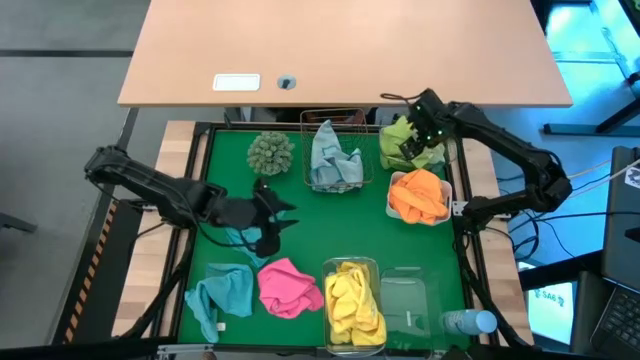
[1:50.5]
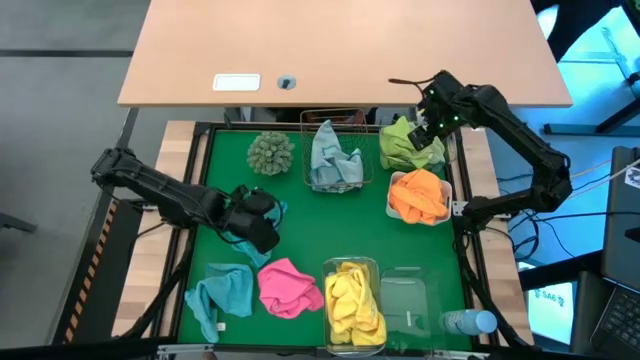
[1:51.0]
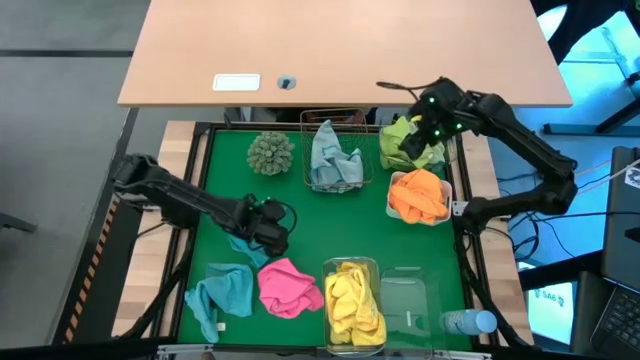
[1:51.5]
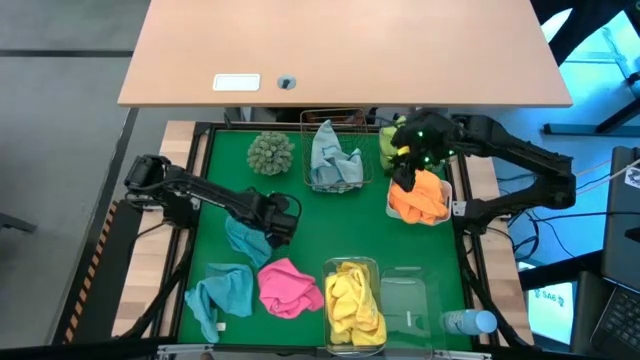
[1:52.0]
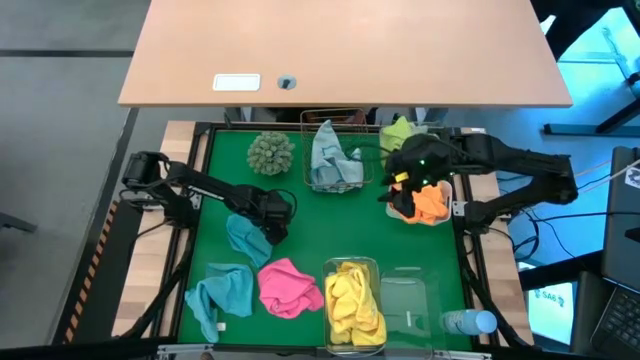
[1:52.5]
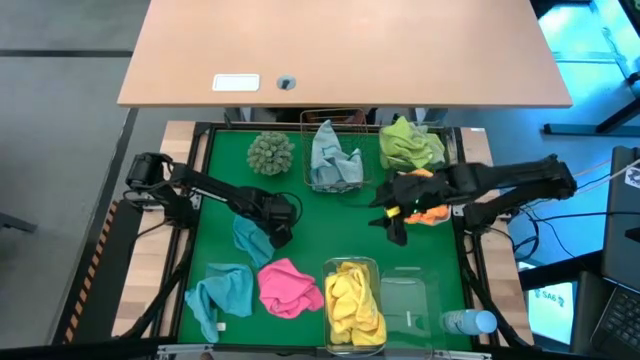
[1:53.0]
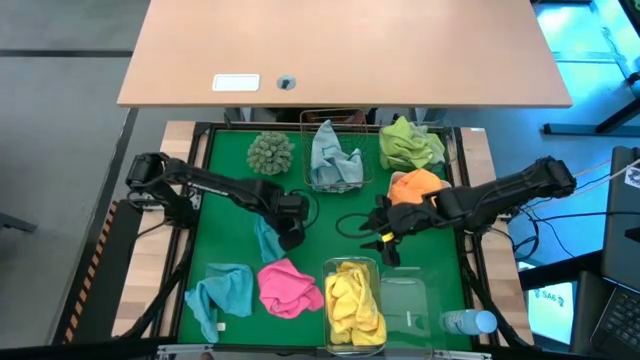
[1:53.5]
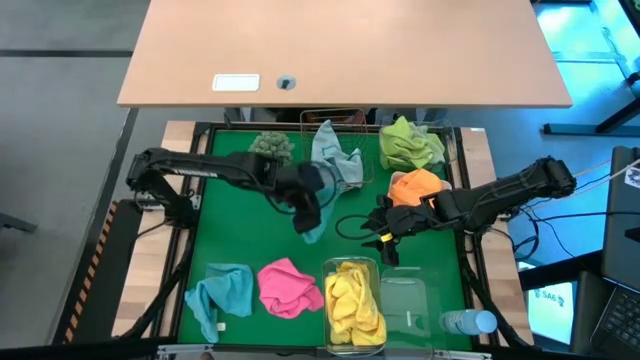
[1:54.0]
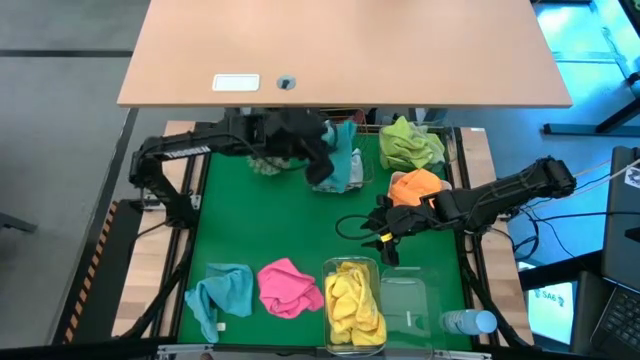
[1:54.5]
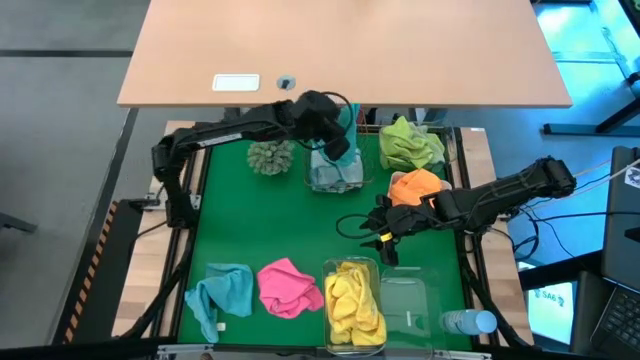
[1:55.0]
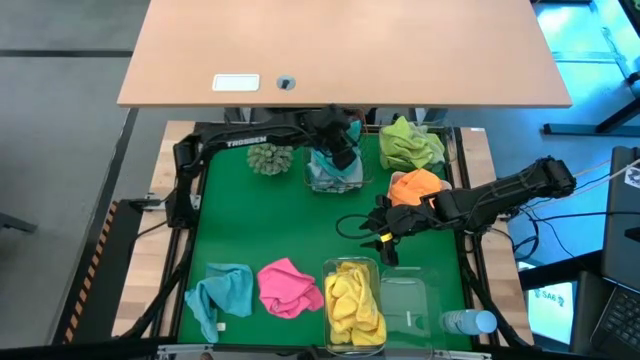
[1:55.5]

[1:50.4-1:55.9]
Task: Sort microfiber towel by color & place in baskets
Put the blue microfiber towel into the wire basket

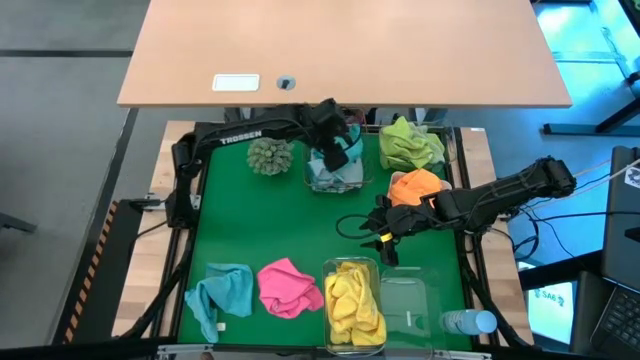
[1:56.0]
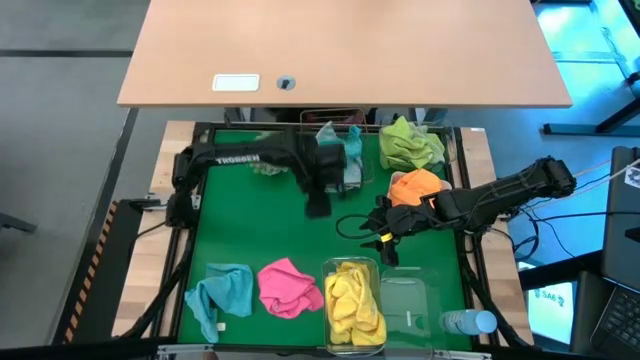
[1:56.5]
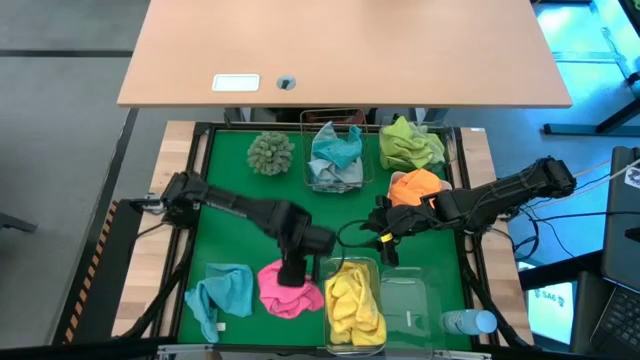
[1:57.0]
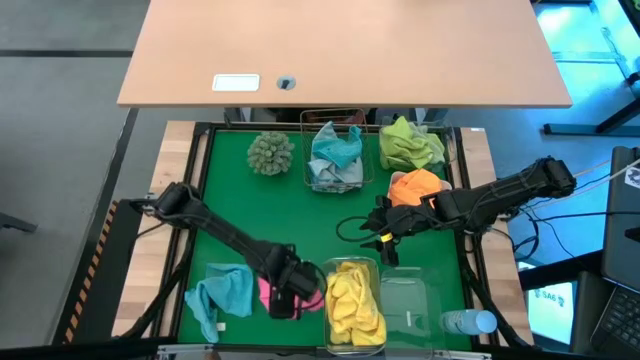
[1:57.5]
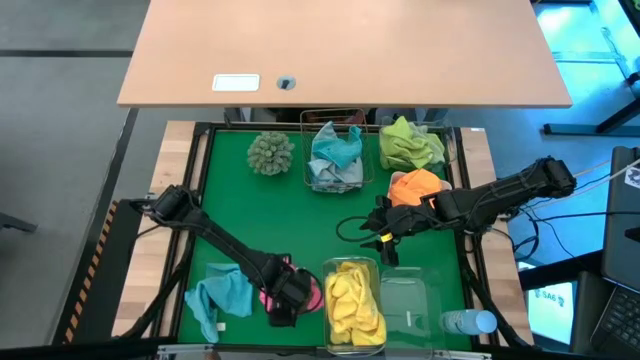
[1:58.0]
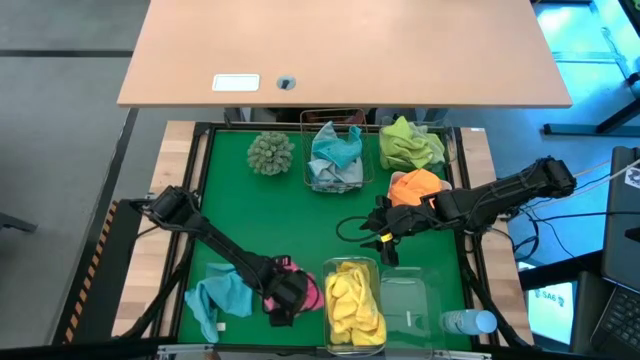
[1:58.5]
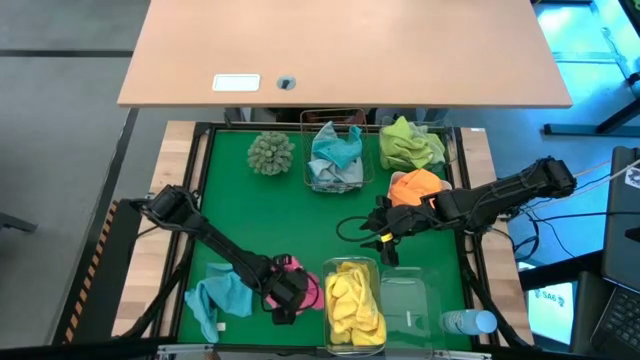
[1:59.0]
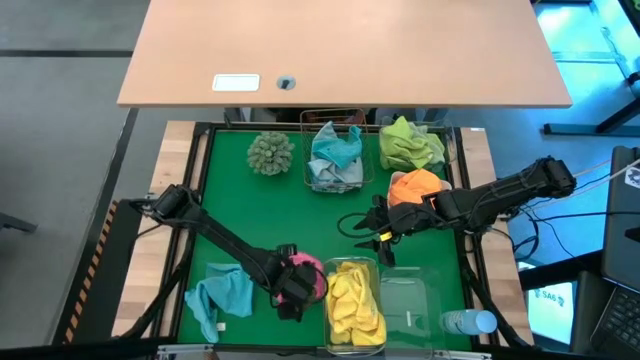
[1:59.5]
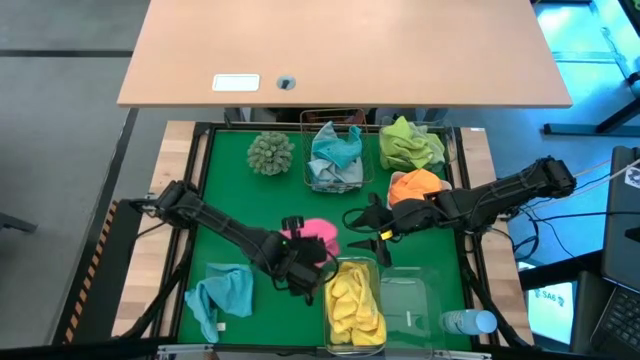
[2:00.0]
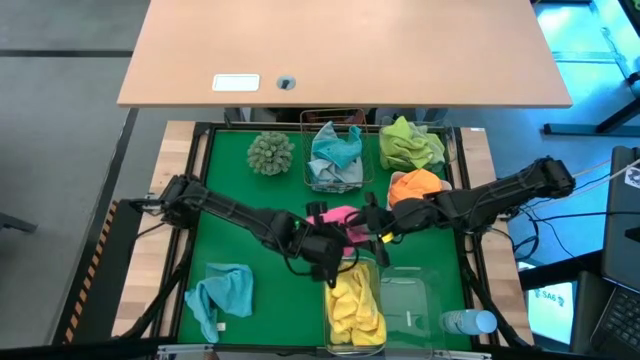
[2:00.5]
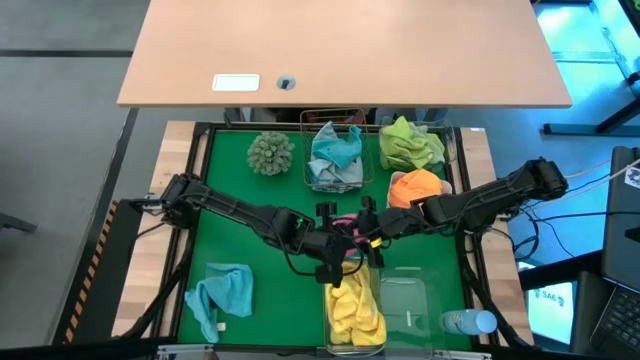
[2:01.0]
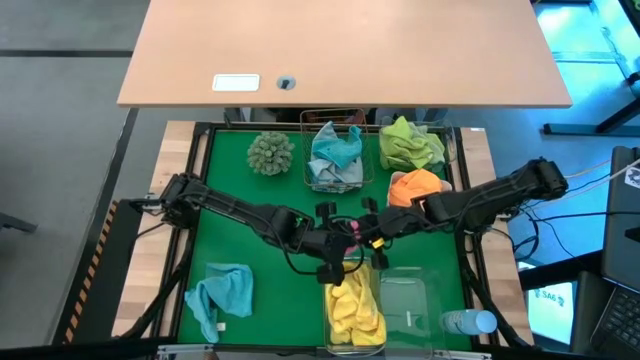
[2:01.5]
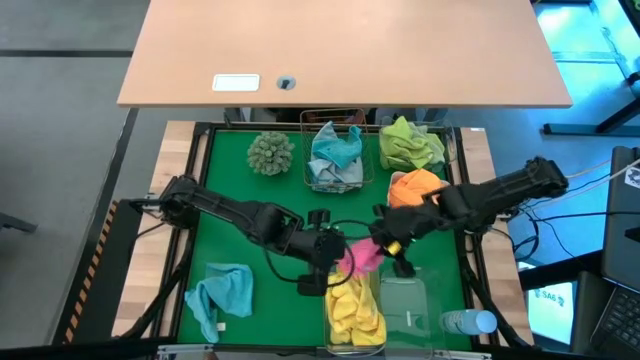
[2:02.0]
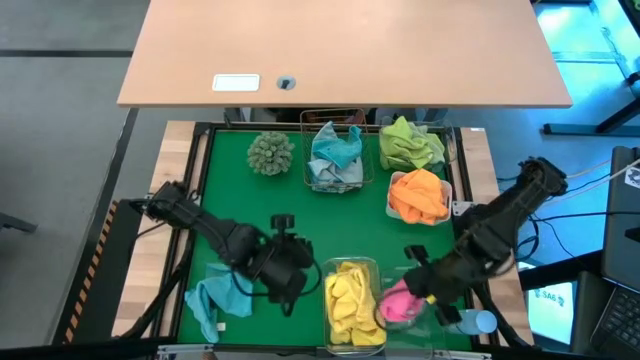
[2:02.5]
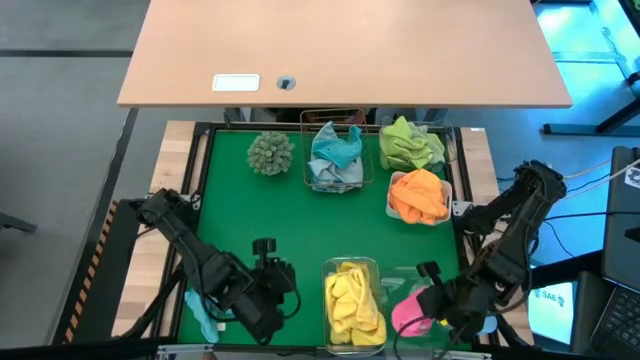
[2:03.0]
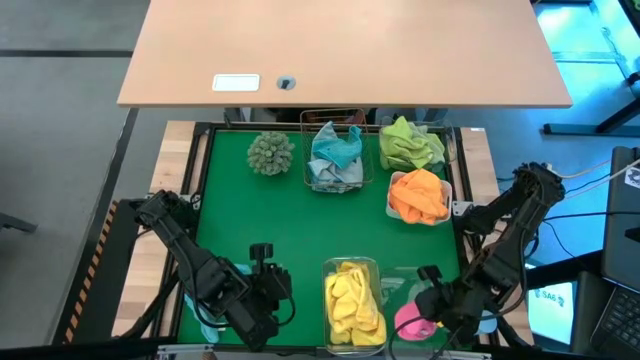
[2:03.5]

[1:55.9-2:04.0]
Put the pink microfiber towel into the bottom right transparent bin

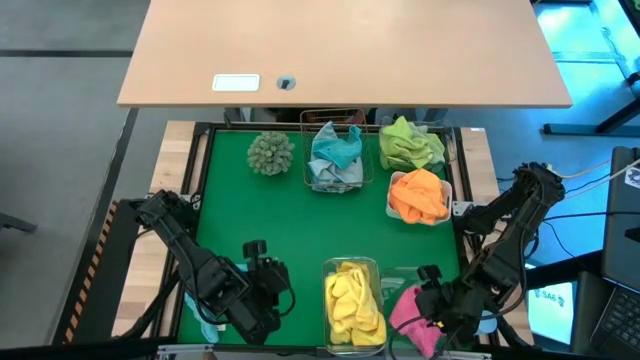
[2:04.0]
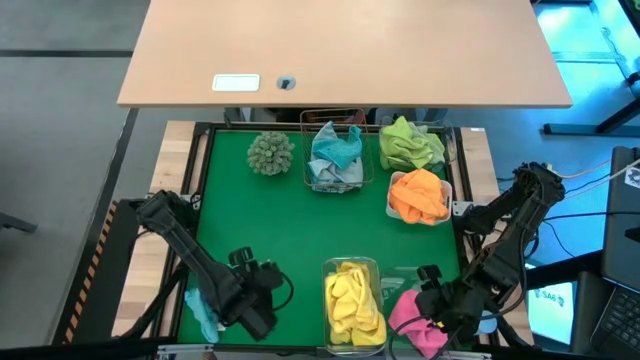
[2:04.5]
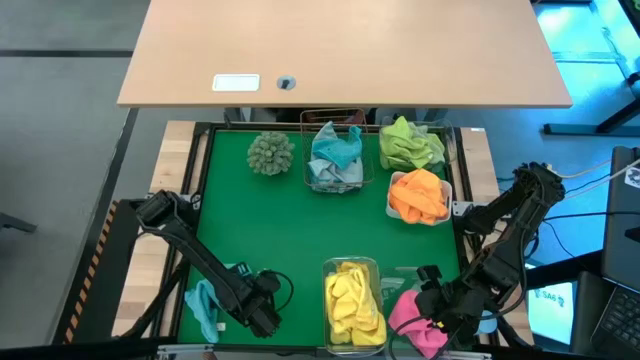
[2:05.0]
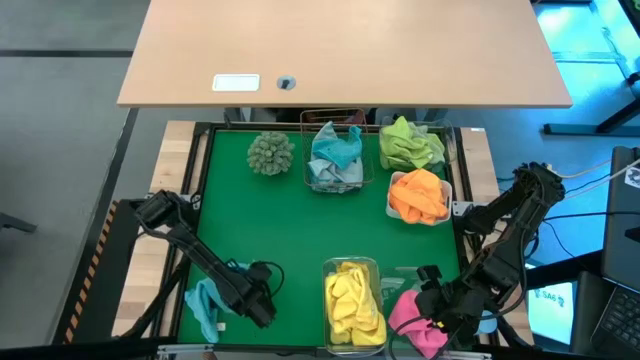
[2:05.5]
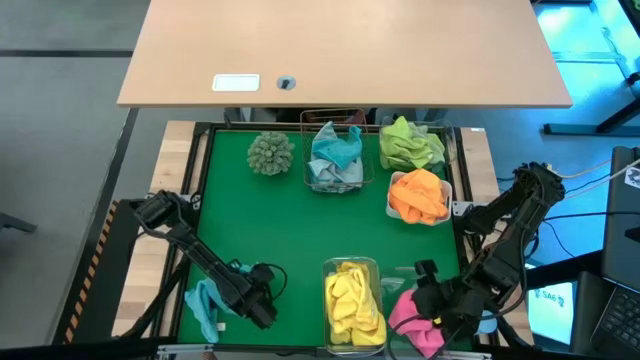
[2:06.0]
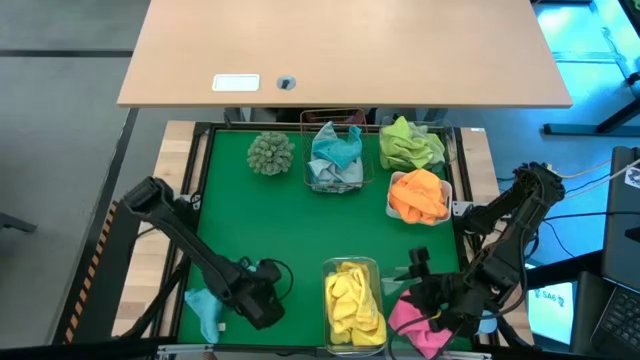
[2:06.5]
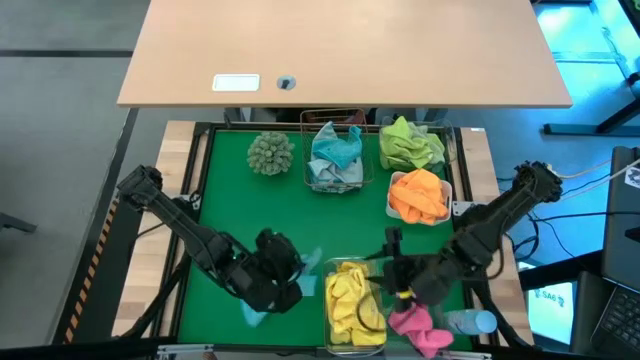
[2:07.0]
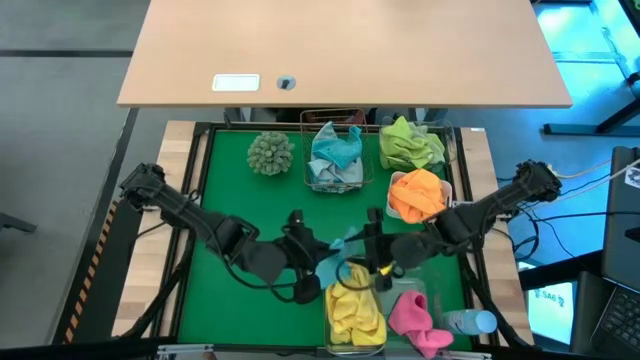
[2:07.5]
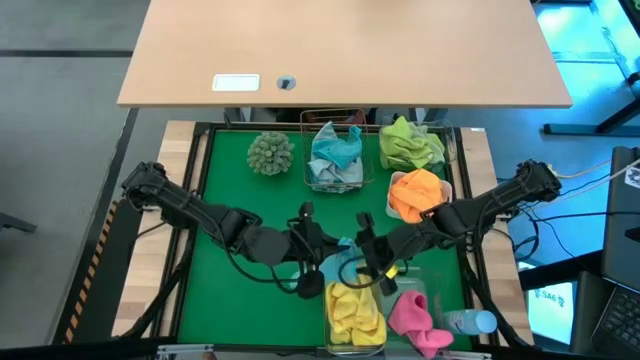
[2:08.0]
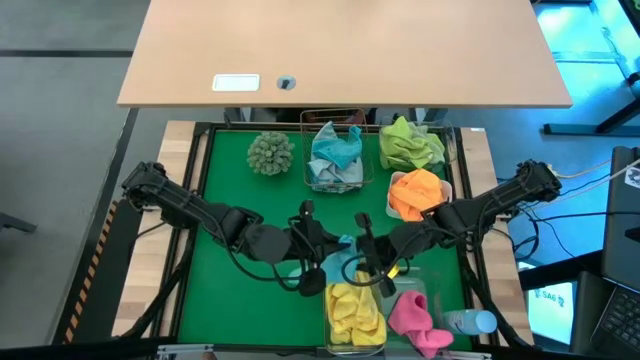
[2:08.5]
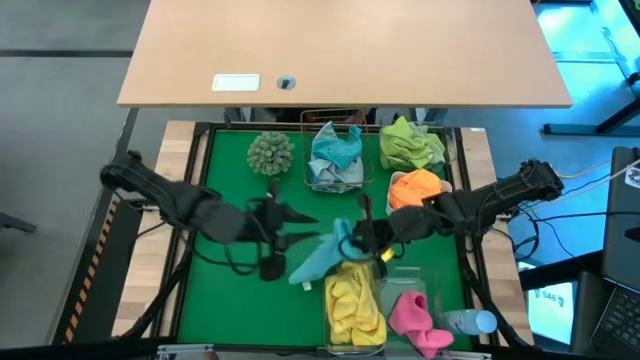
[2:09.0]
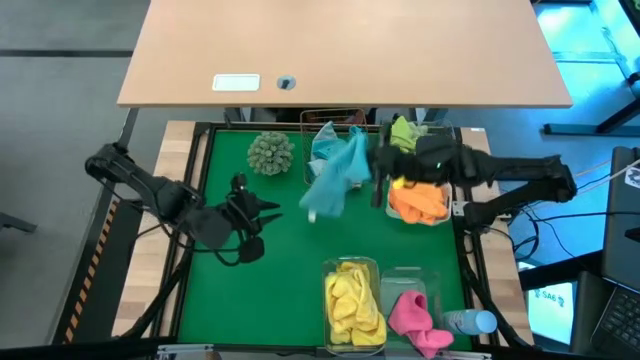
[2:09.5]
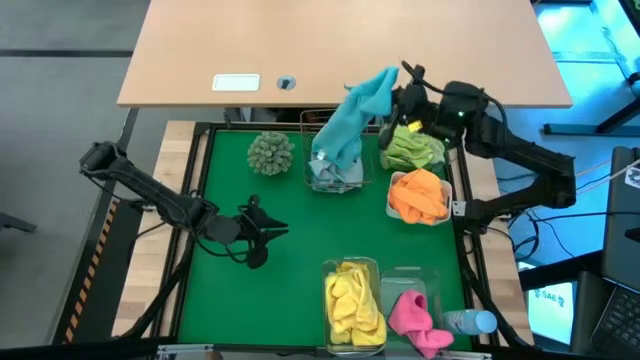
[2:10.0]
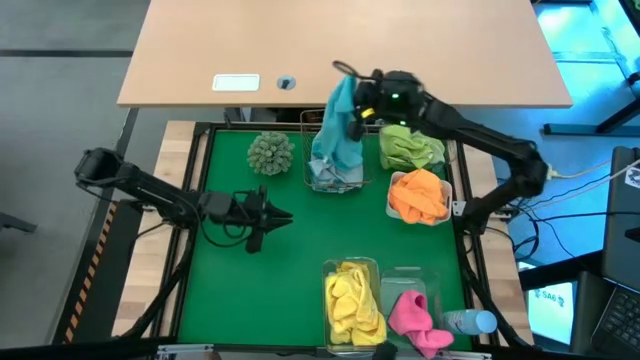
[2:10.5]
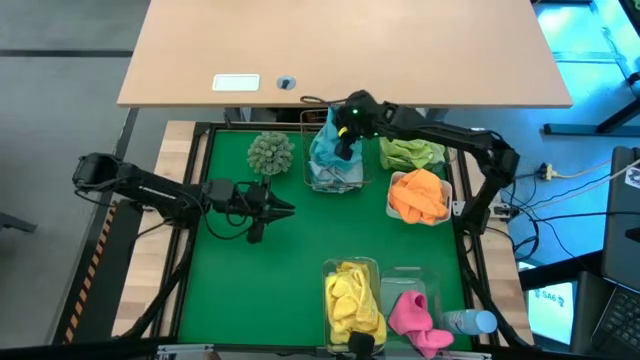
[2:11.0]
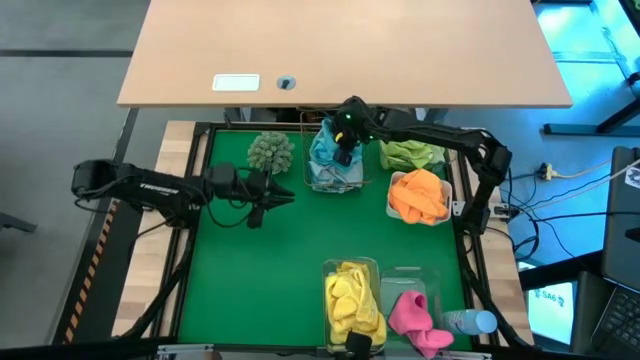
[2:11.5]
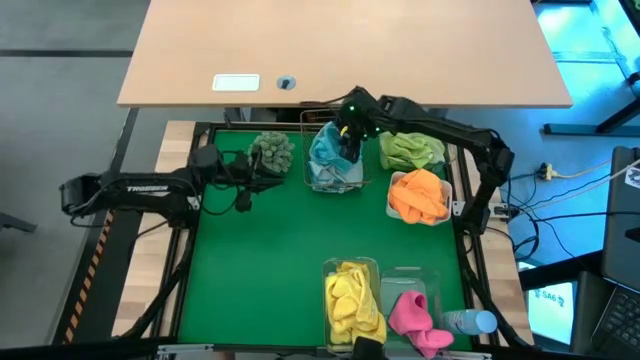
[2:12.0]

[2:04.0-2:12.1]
Put the blue microfiber towel into the wire basket
